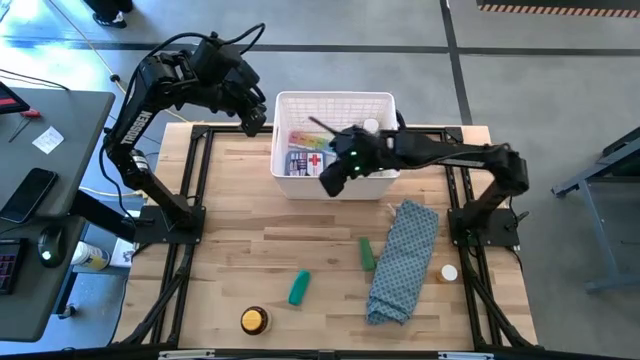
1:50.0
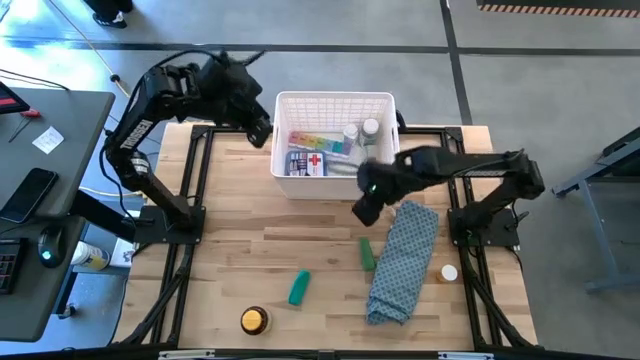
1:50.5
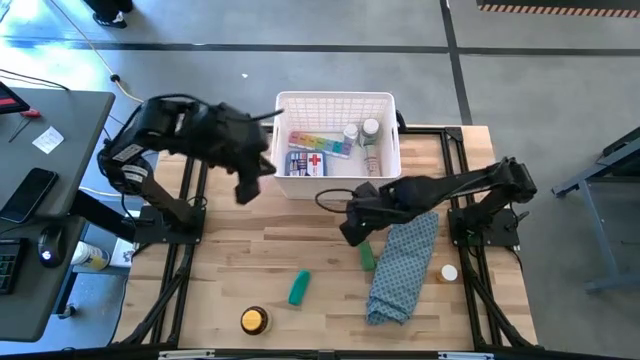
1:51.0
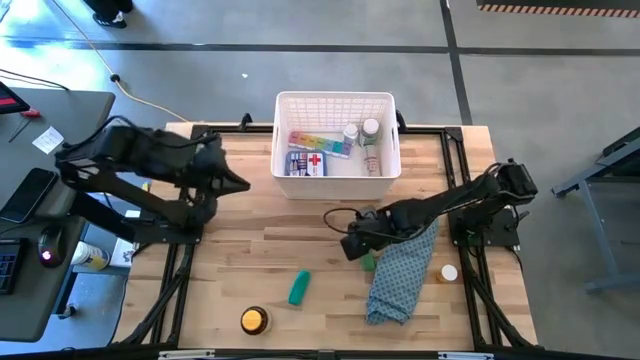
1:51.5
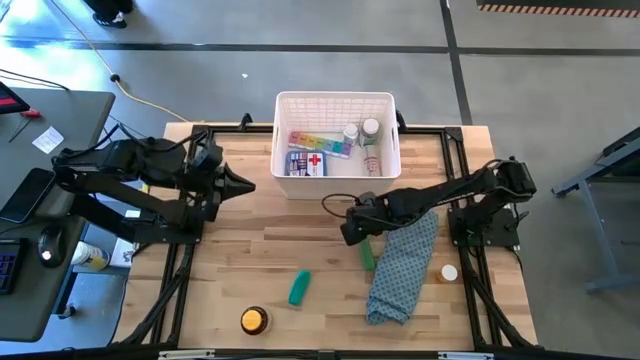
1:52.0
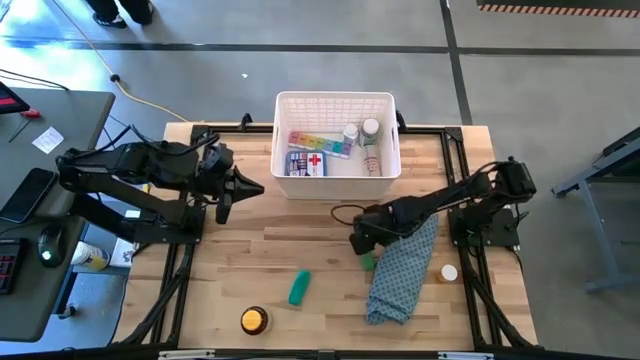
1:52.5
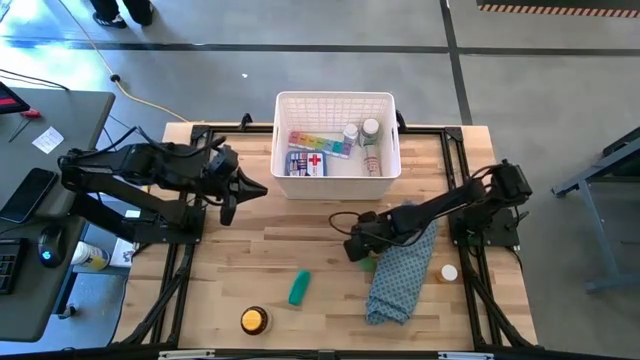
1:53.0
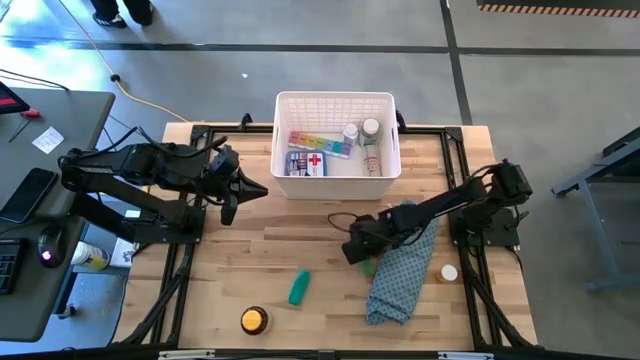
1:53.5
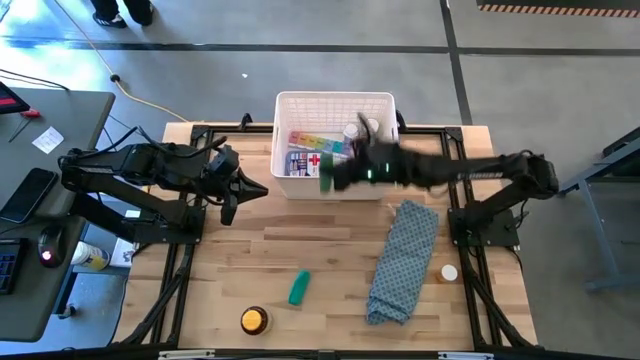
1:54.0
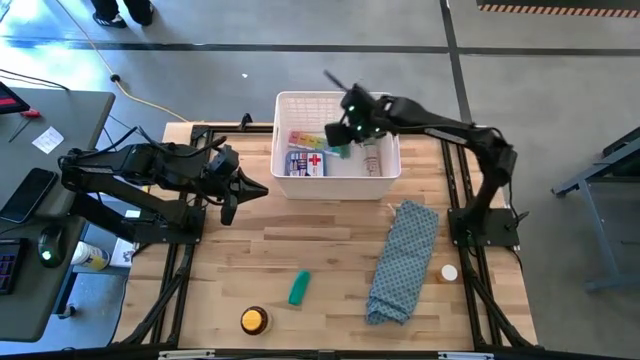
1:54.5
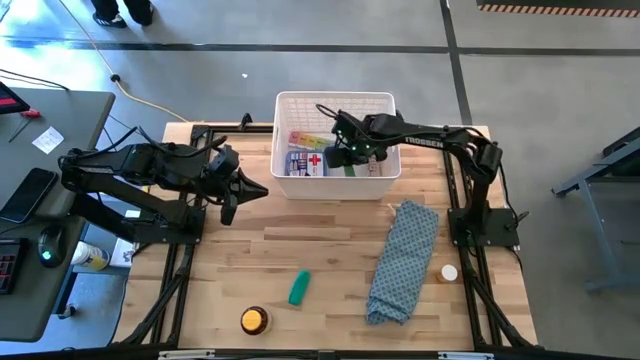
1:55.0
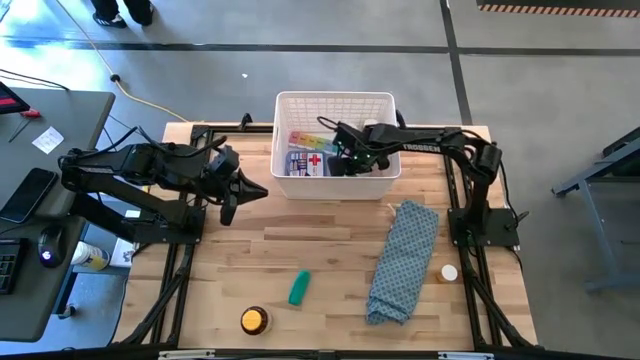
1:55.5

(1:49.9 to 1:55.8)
Task: Pick & place medical supplies in basket/bin
Put the green bandage into the white bin

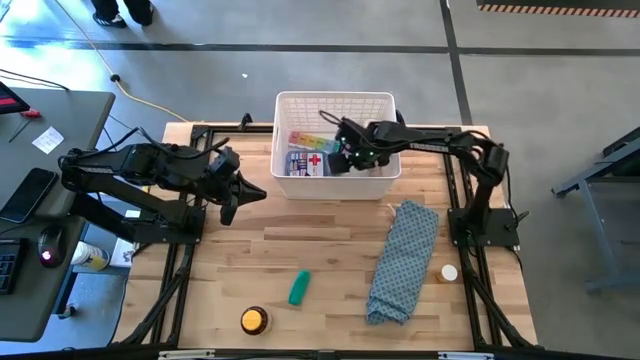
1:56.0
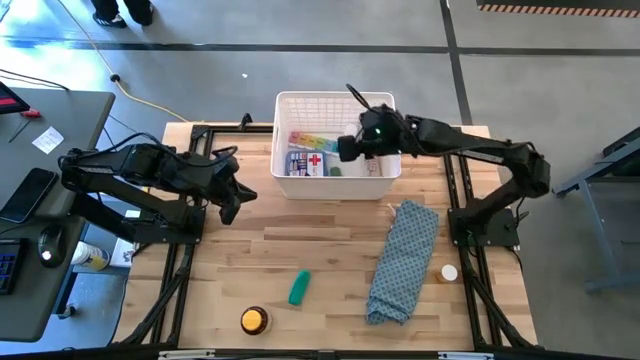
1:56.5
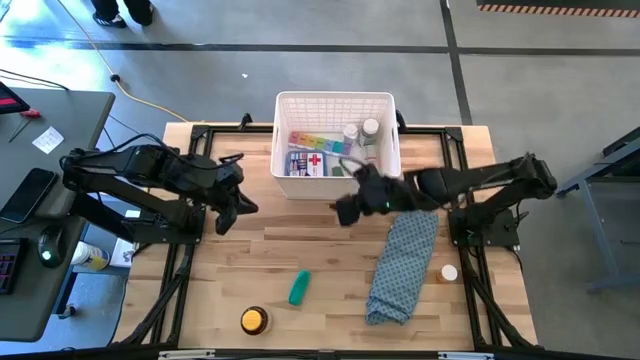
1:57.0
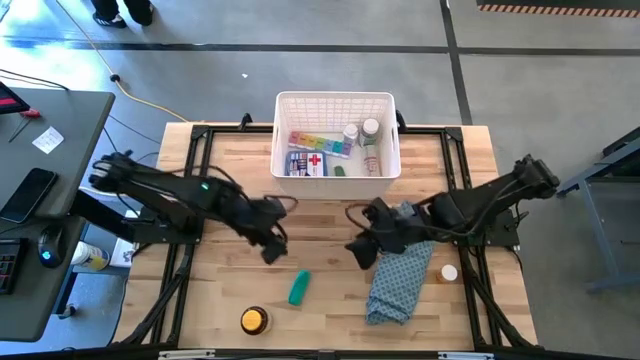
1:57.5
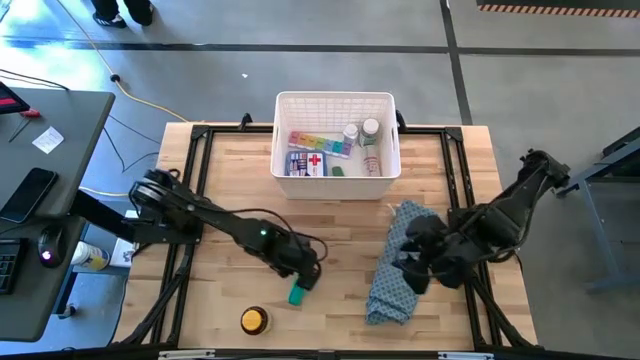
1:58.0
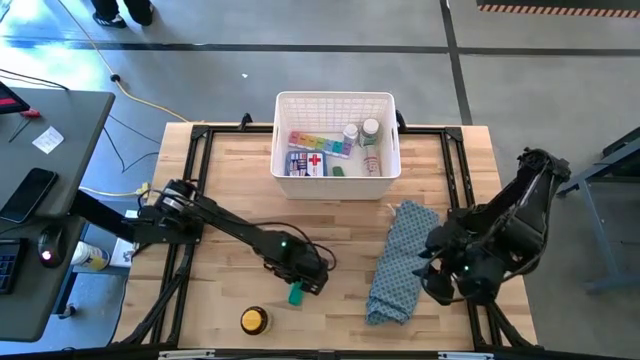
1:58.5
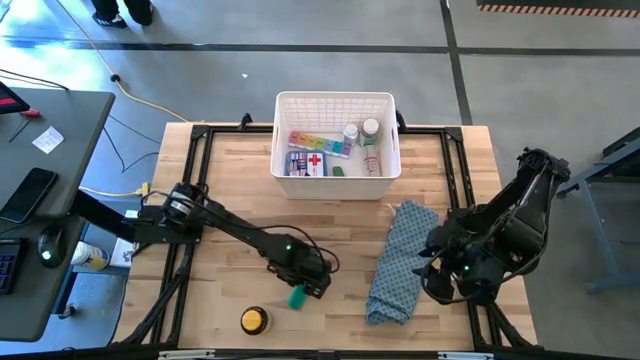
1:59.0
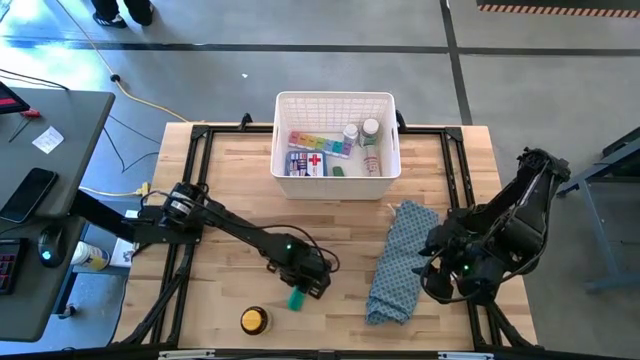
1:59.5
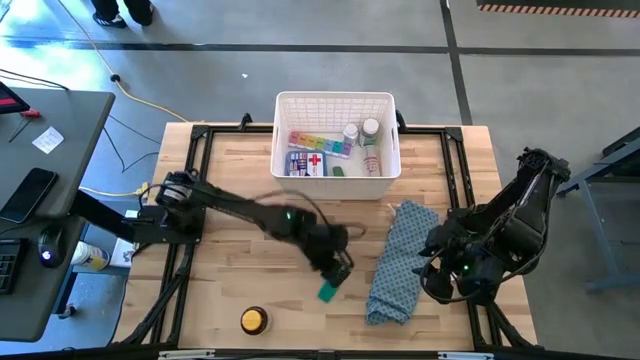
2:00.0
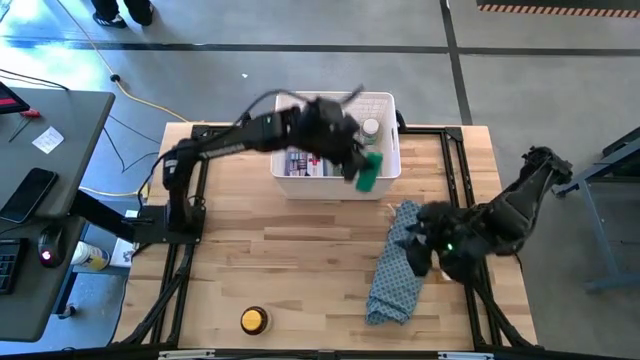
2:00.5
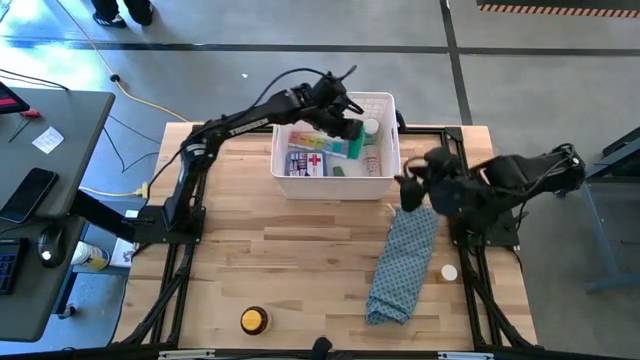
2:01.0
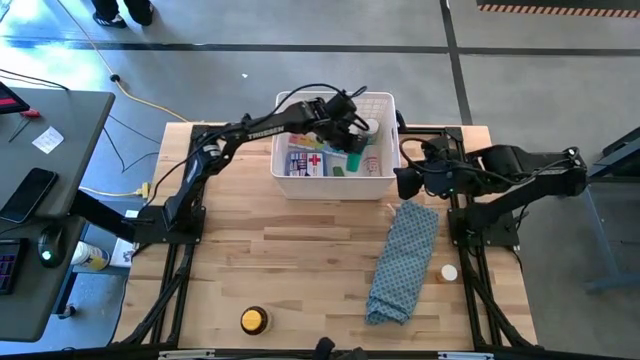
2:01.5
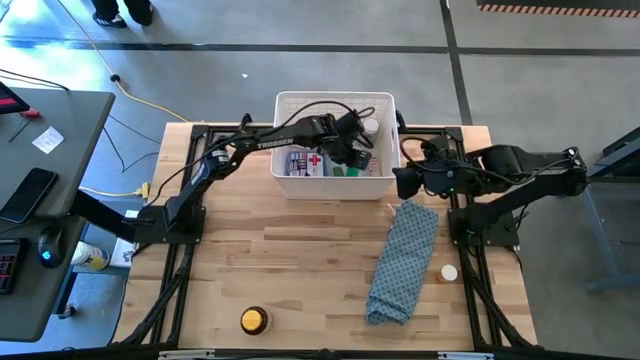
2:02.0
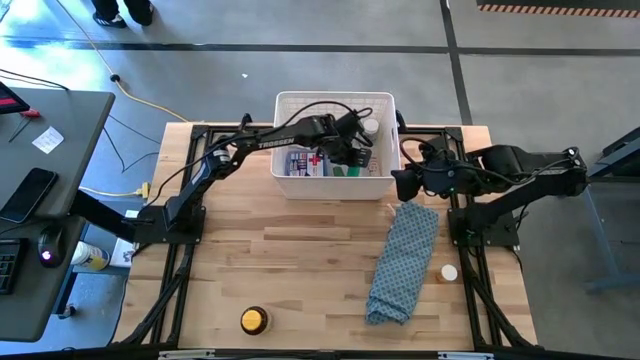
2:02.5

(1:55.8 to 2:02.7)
Put the light green bandage into the white bin

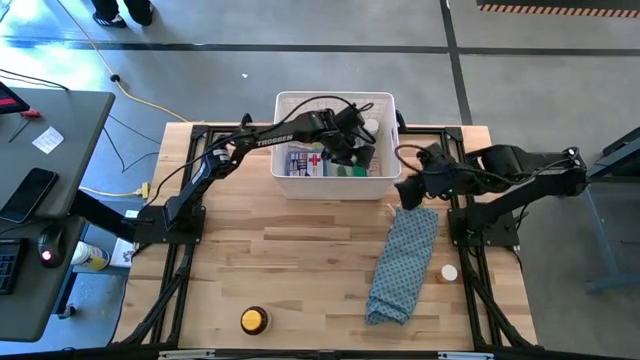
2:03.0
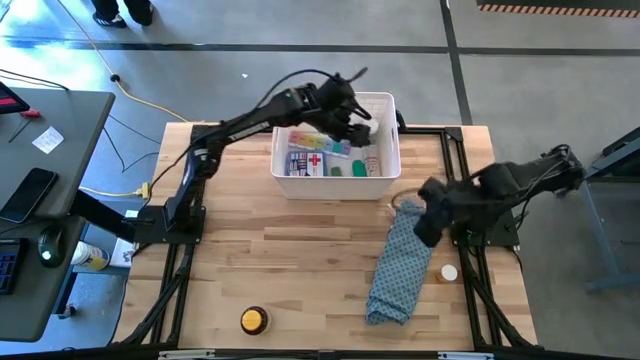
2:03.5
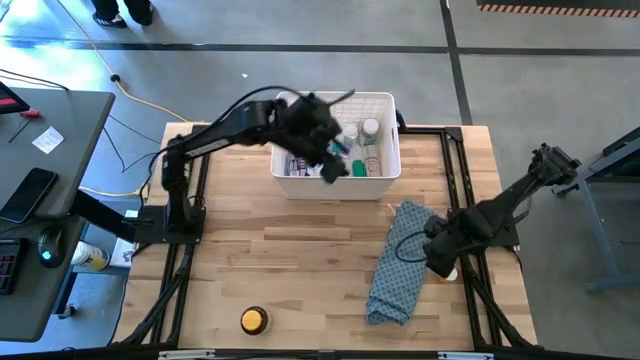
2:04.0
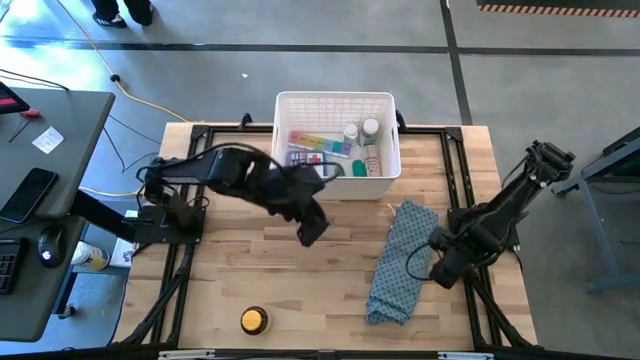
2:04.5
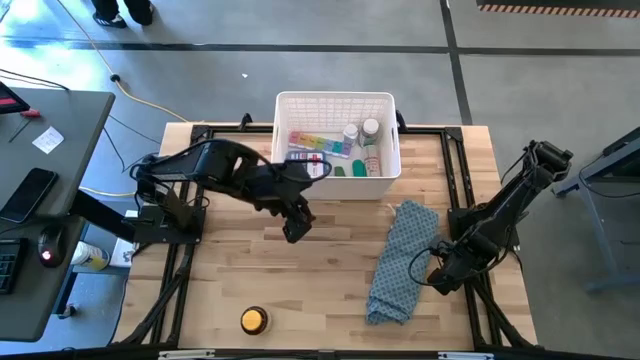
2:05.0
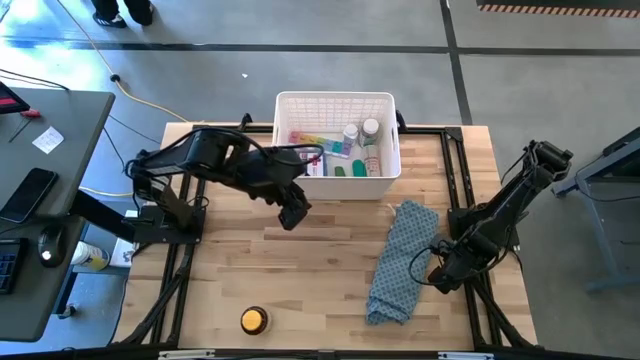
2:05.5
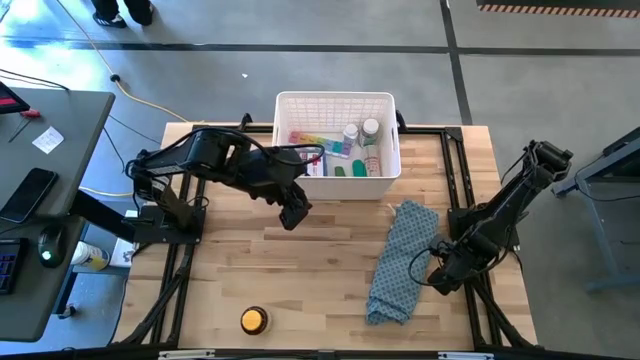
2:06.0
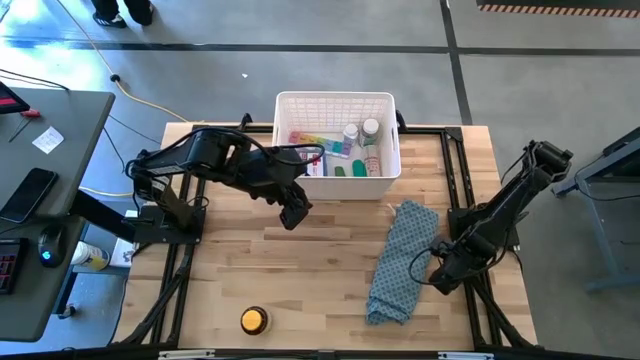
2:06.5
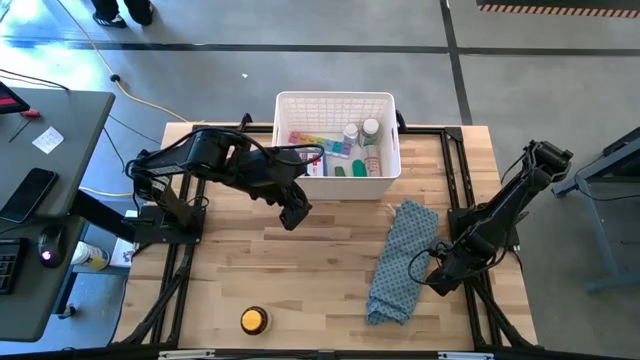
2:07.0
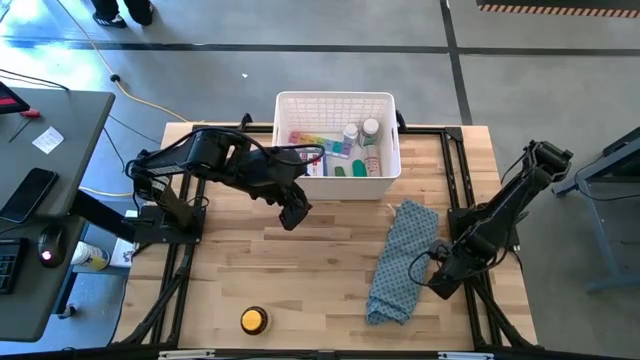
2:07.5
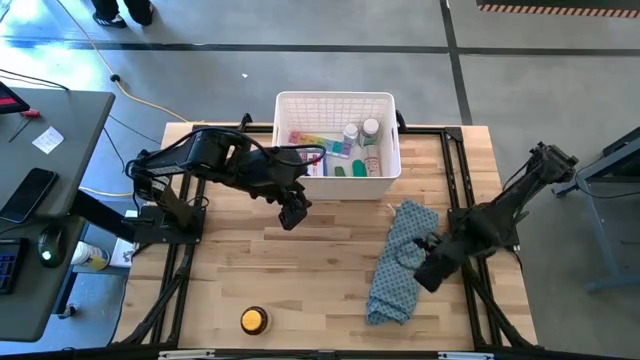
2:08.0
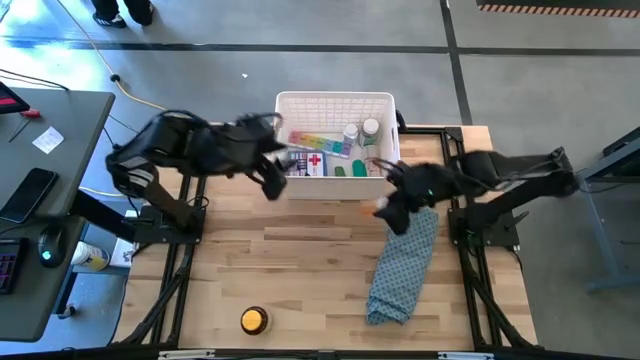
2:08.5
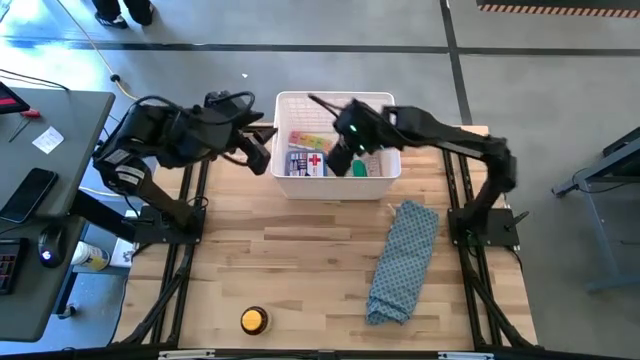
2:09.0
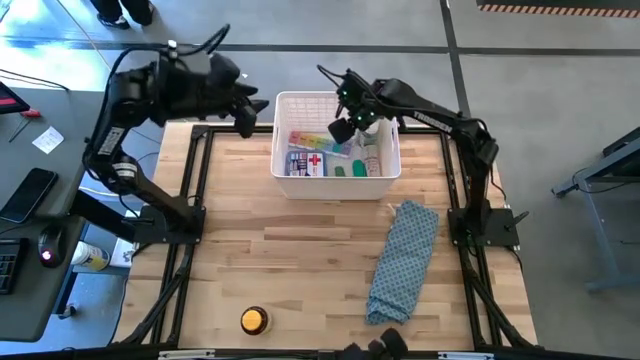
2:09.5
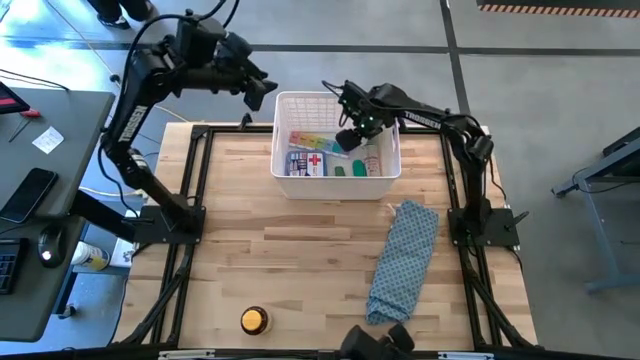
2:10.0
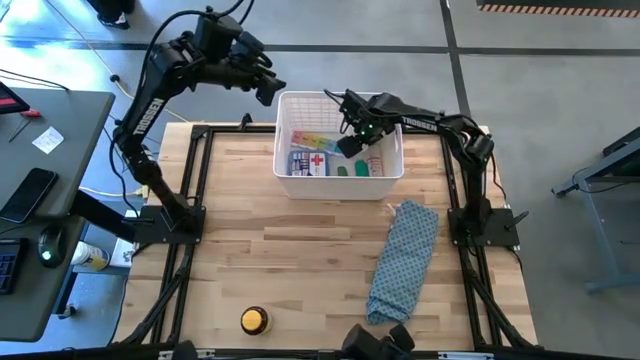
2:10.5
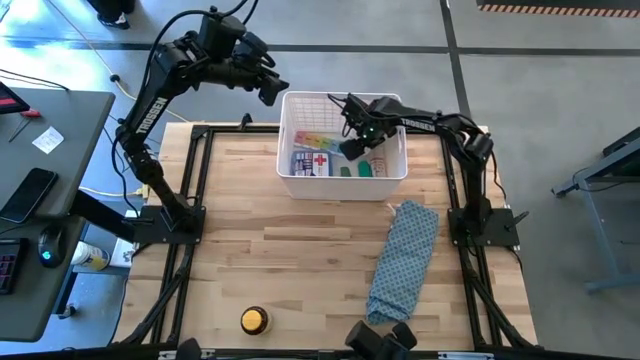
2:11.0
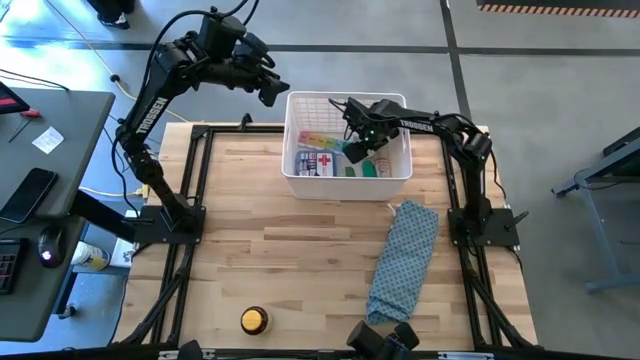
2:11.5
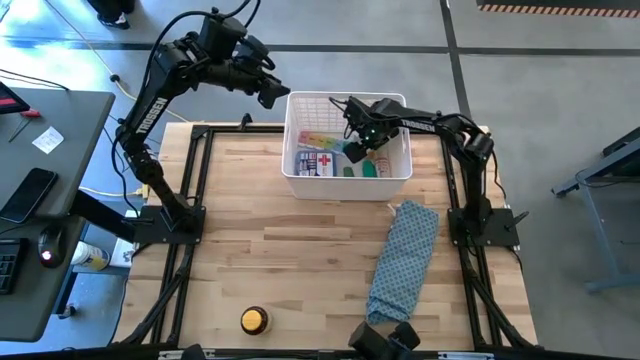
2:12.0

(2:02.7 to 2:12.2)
Put the orange pill bottle into the white bin
